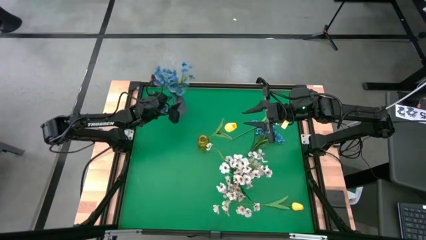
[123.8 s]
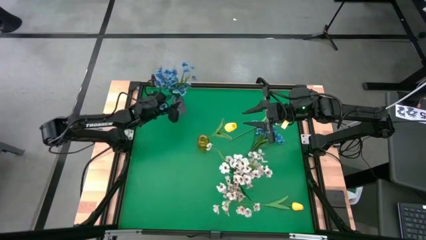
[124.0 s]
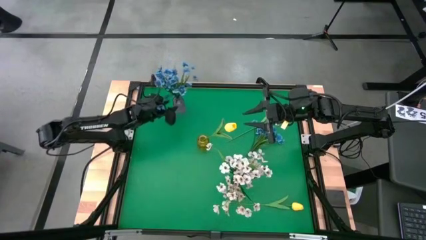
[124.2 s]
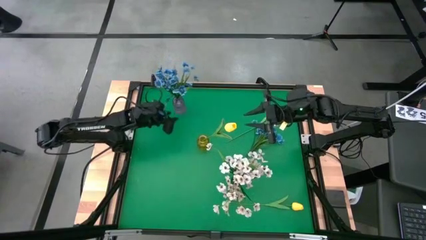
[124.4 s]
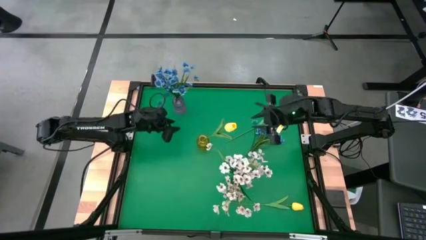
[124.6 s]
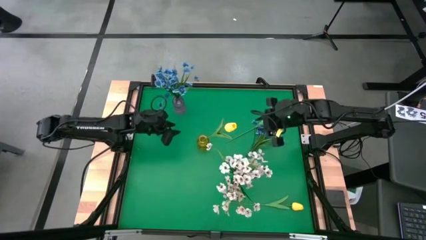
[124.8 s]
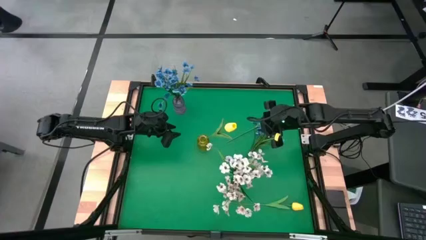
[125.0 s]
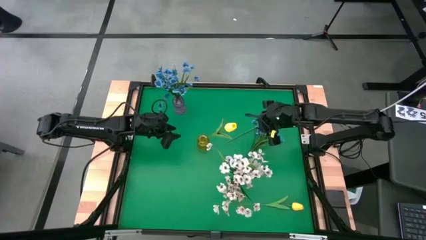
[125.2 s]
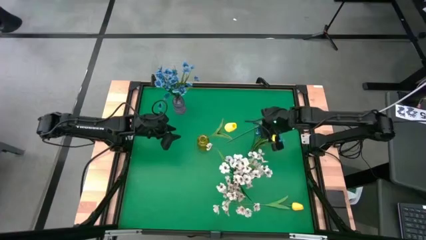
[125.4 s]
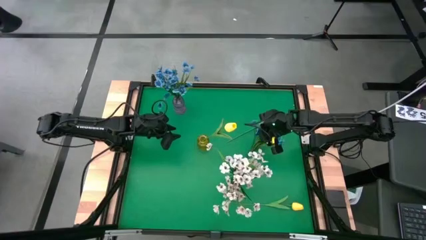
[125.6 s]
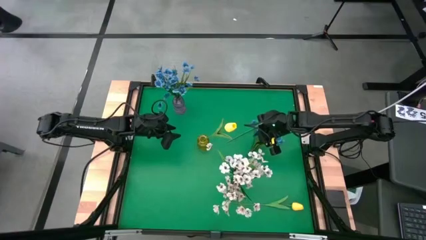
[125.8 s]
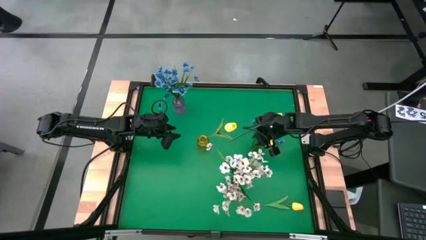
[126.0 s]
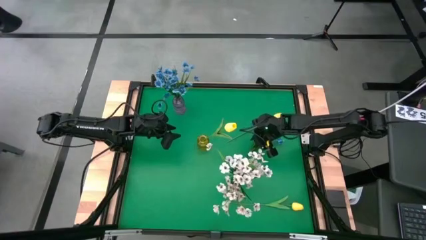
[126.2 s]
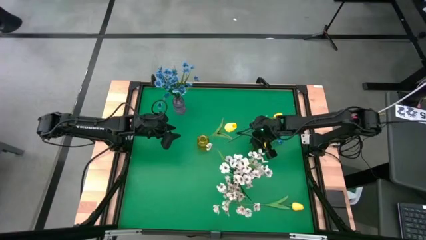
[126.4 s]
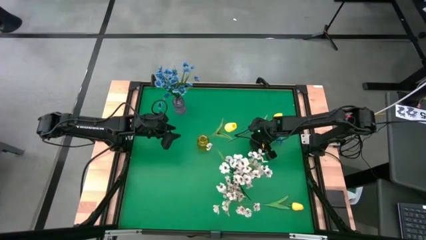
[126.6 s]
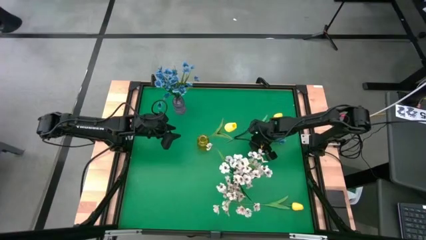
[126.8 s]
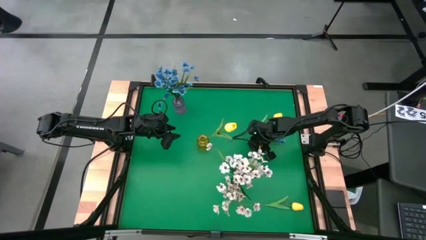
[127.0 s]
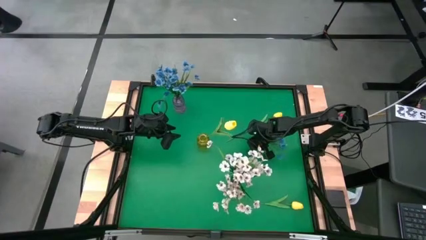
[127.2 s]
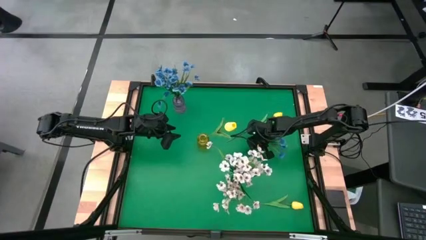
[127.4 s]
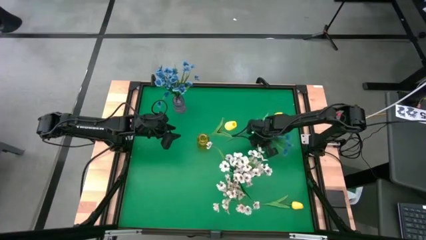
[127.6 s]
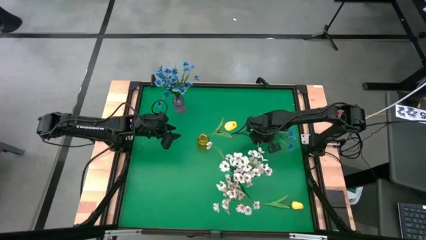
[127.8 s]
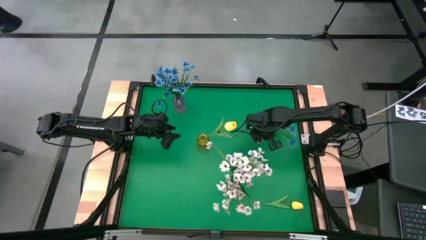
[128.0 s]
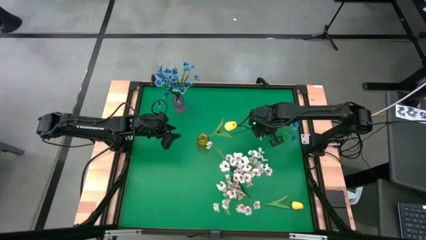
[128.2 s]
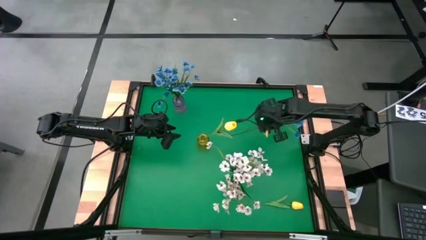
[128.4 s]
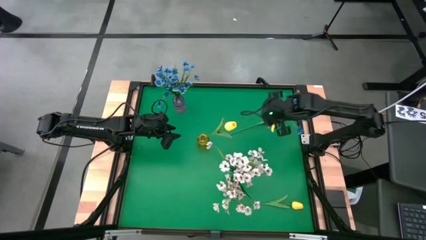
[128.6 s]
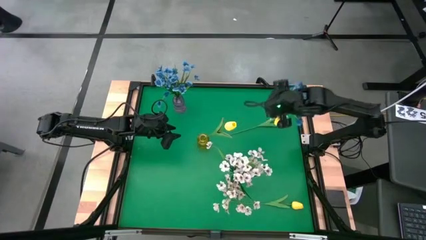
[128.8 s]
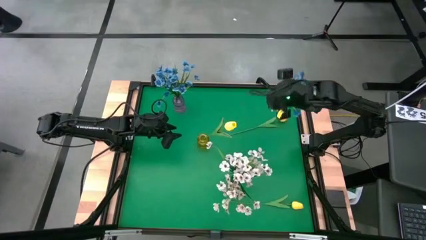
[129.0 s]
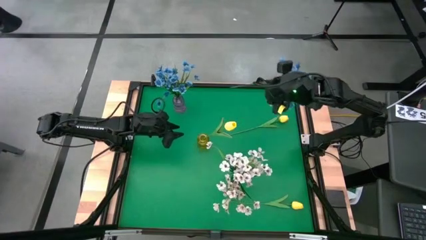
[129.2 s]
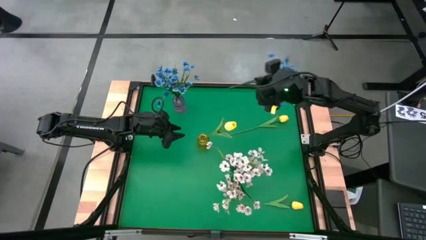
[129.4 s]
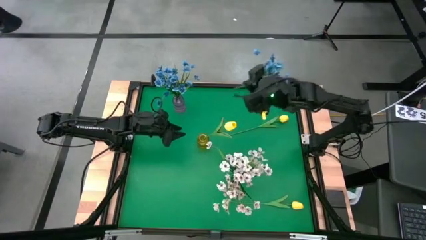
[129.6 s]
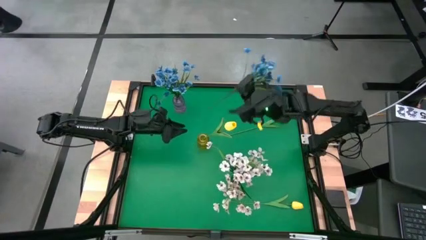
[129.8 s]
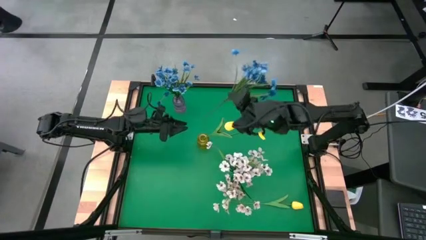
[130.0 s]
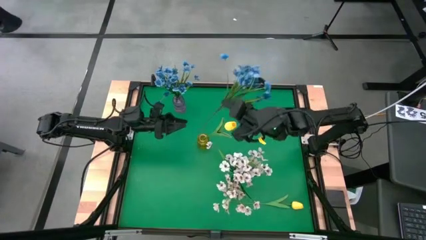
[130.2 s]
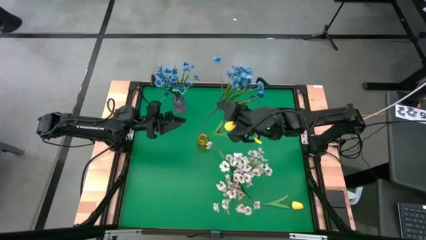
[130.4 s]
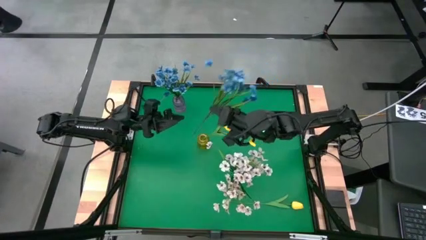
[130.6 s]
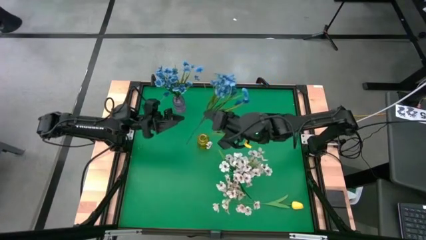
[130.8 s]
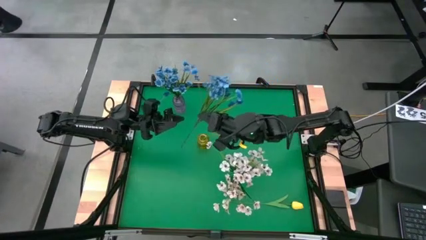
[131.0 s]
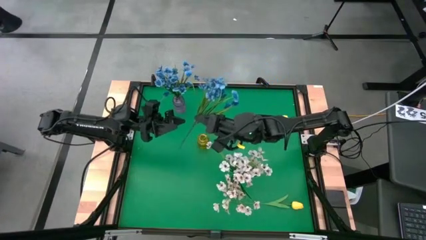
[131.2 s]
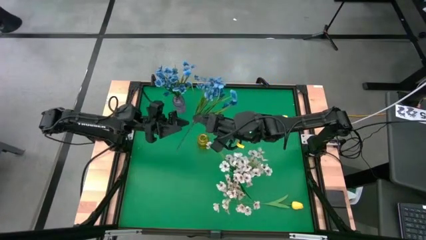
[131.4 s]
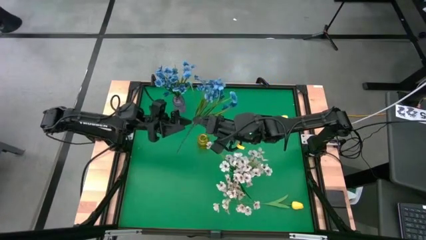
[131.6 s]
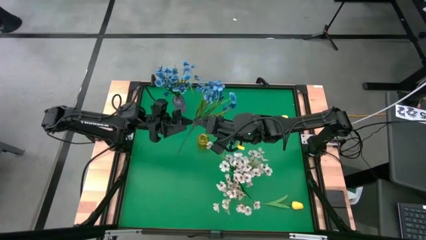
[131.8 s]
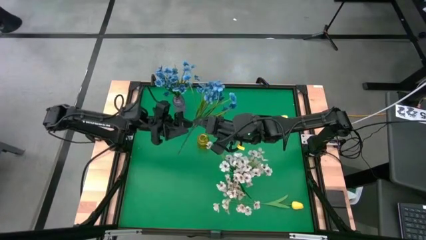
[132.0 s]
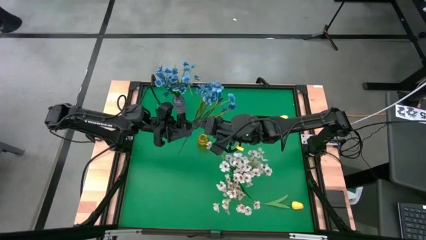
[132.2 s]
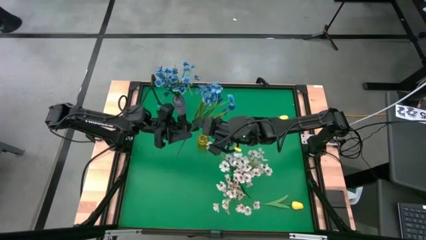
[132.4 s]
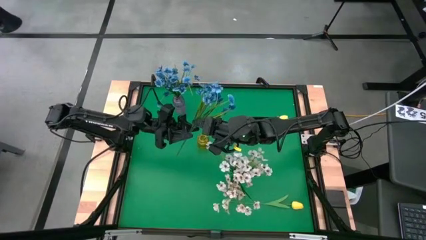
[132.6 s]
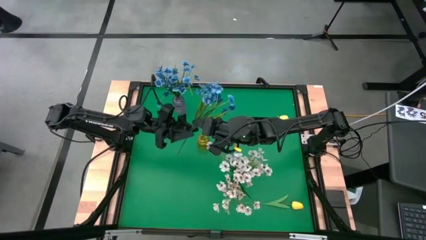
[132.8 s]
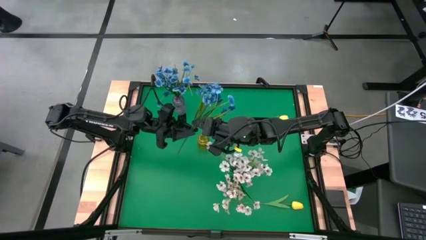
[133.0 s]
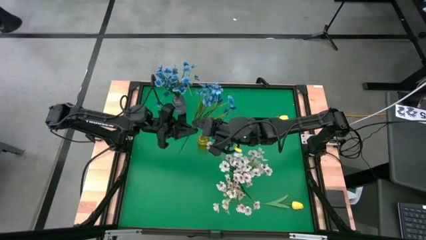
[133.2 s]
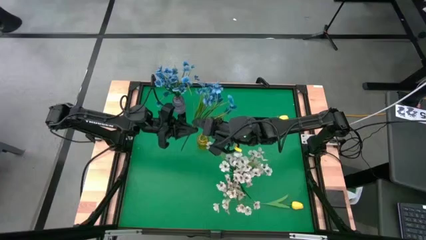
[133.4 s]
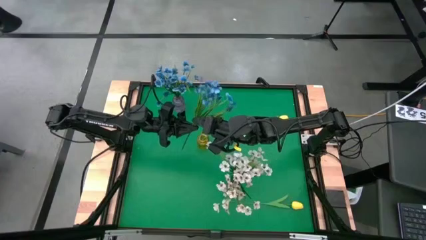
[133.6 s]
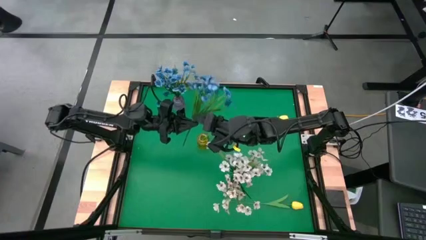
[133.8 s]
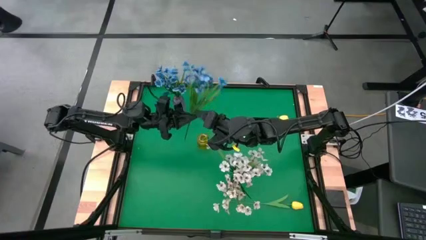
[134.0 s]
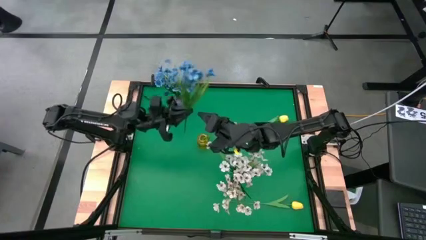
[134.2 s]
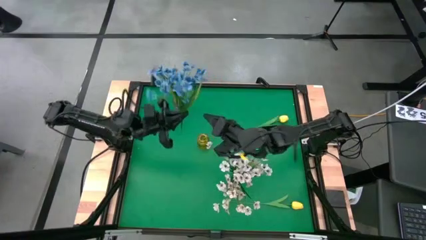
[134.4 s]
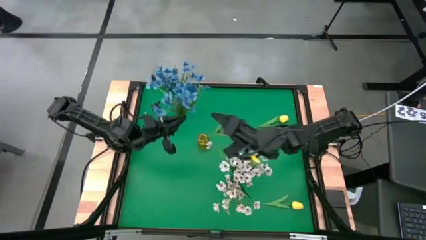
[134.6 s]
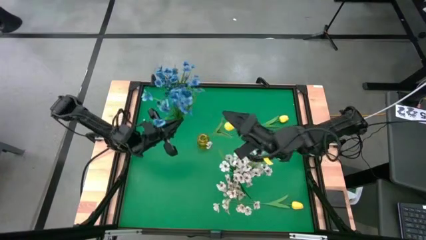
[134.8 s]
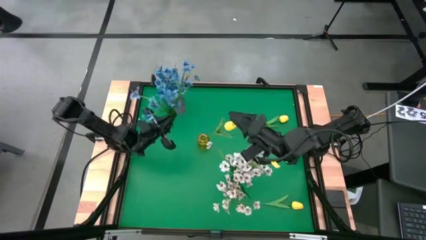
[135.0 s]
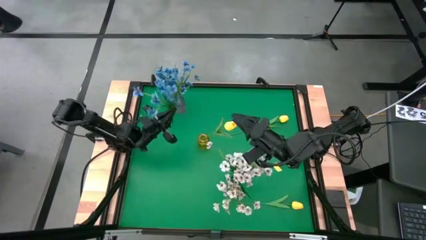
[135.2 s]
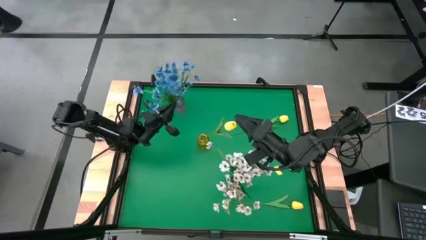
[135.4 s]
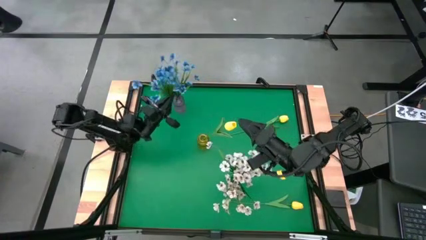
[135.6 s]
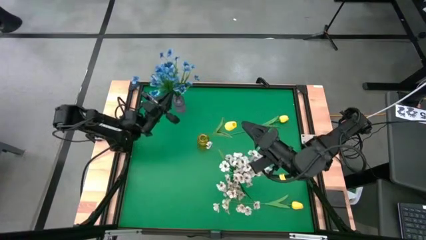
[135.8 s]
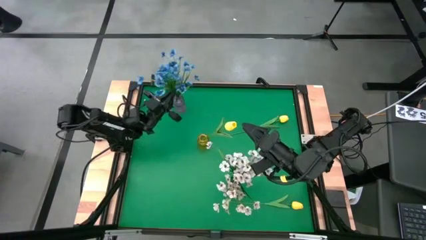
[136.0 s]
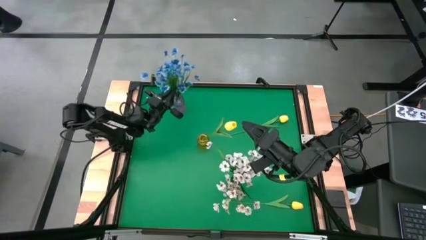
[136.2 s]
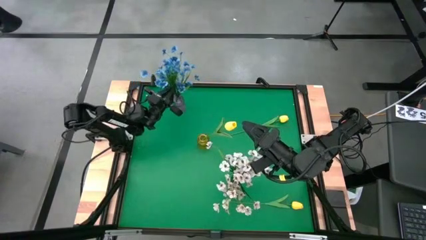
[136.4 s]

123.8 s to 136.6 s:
Task: Sort flowers into vase by color
Put the blue flowers into the purple vase

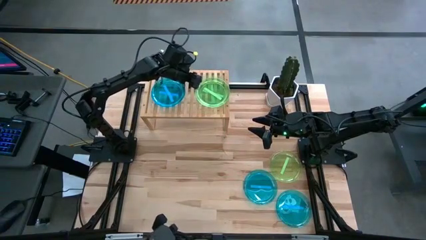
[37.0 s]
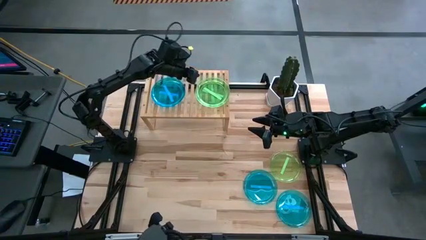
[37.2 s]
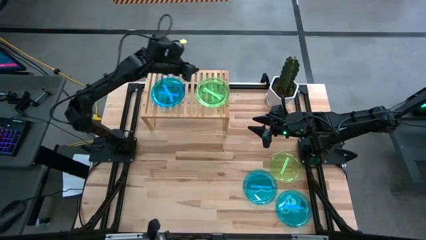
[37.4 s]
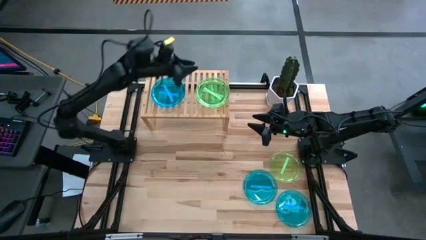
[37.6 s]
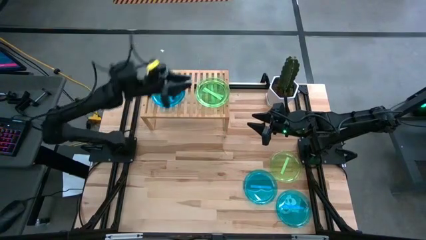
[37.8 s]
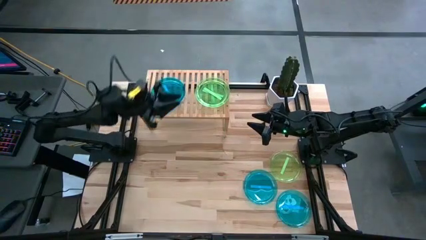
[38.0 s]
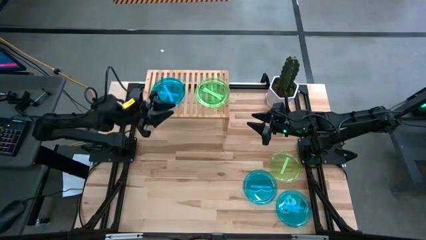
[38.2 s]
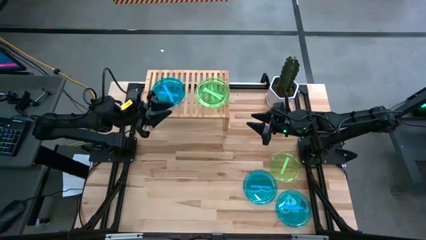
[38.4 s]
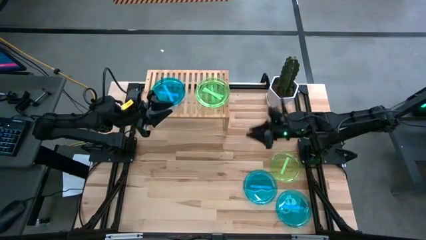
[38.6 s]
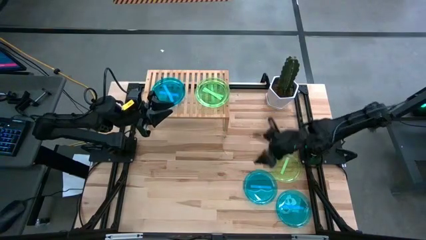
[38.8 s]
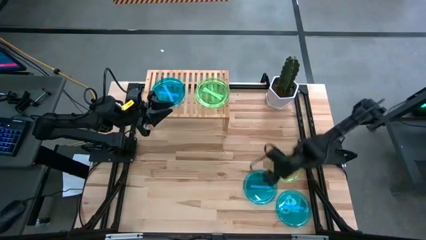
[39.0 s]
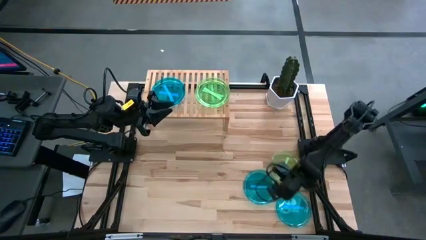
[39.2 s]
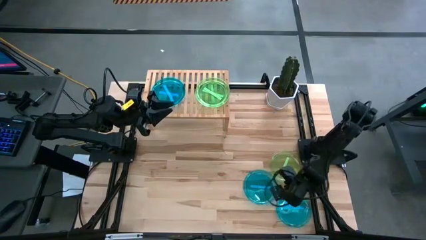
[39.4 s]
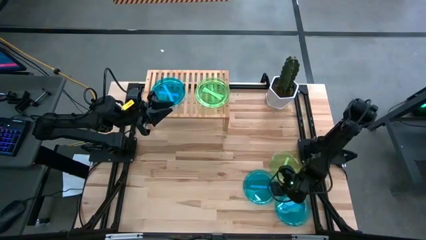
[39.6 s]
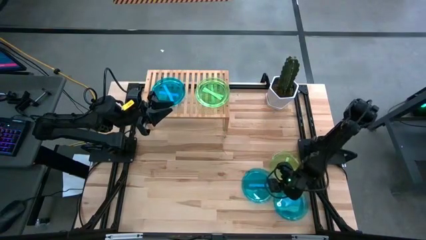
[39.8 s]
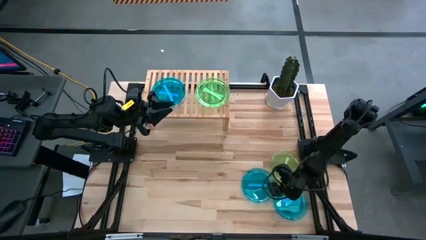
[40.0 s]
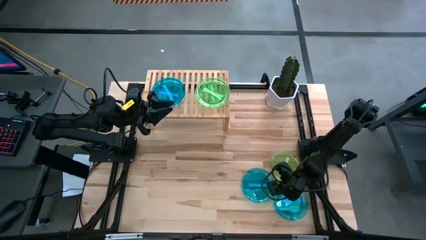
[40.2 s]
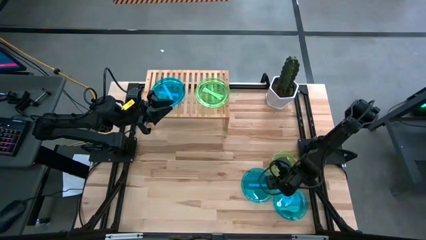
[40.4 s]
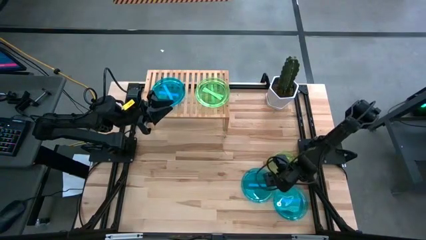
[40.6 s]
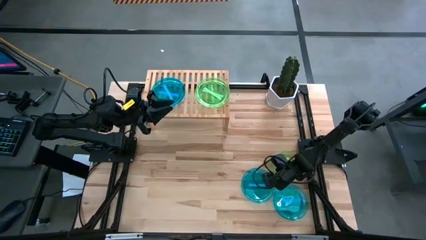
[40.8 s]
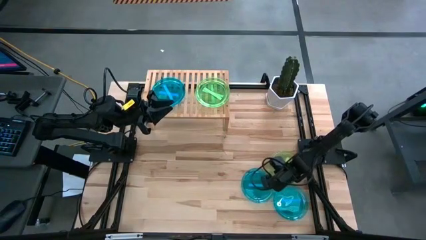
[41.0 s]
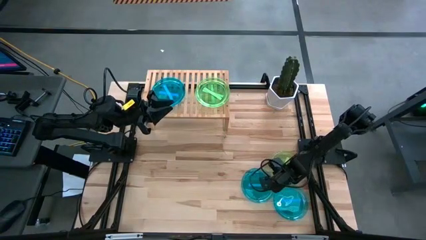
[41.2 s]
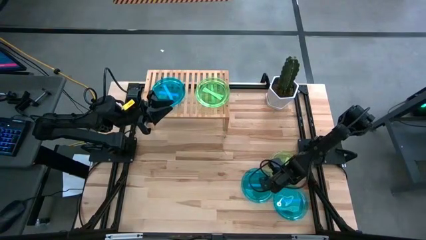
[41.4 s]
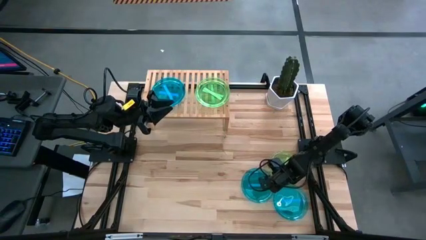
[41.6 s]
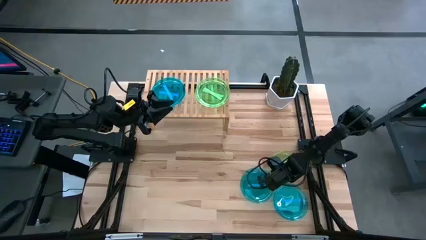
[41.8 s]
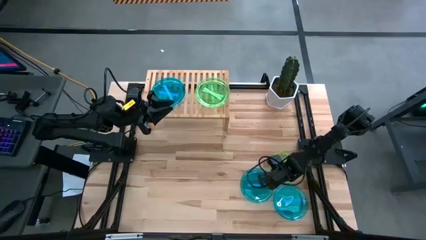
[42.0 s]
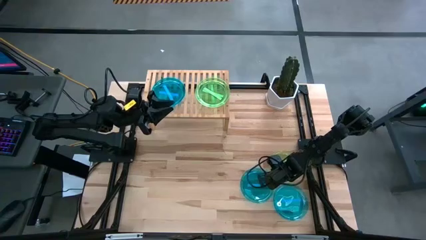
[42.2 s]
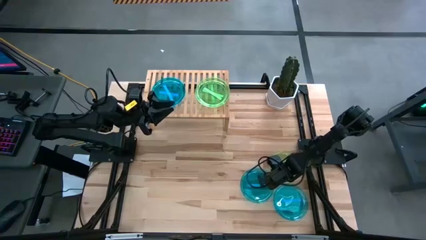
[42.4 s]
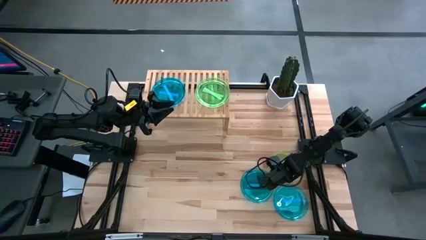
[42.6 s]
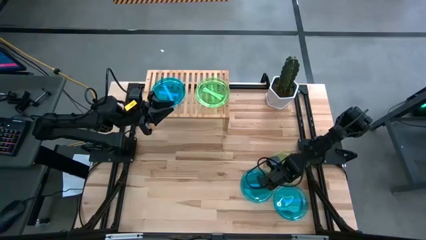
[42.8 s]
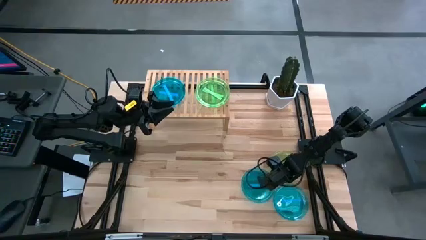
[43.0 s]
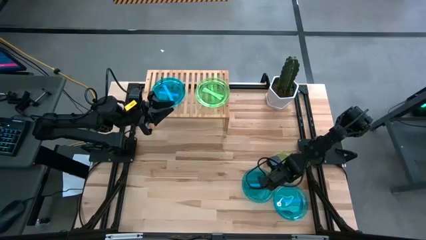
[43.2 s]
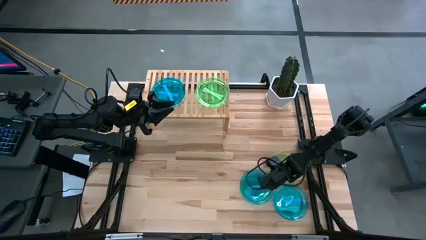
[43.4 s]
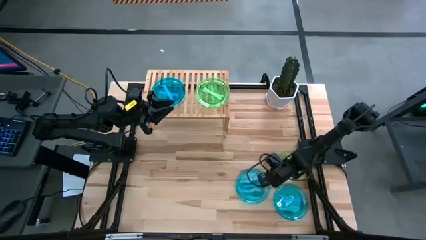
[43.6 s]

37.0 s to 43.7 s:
Task: Place and stack plates onto a shelf
Stack the blue plate on top of the blue plate on the shelf
